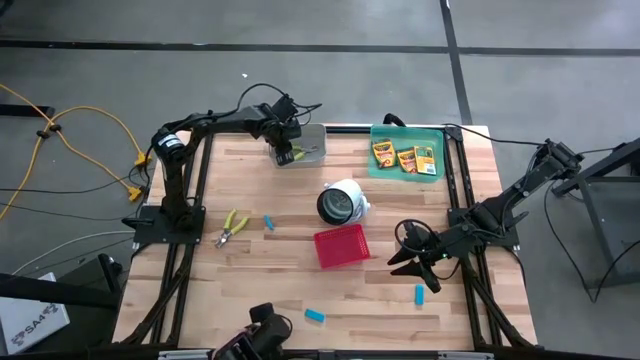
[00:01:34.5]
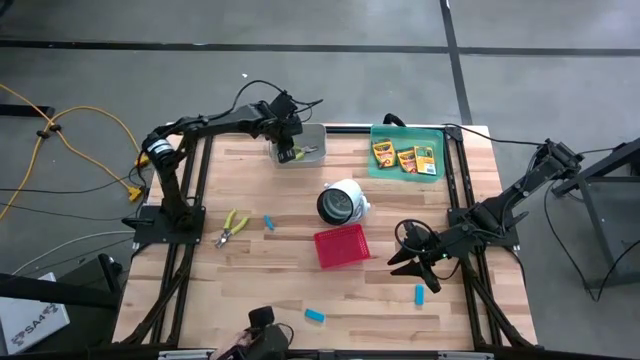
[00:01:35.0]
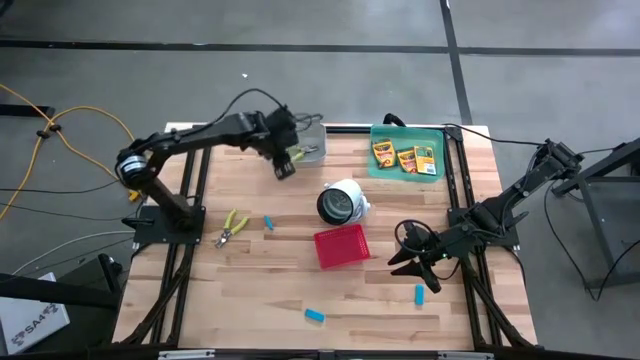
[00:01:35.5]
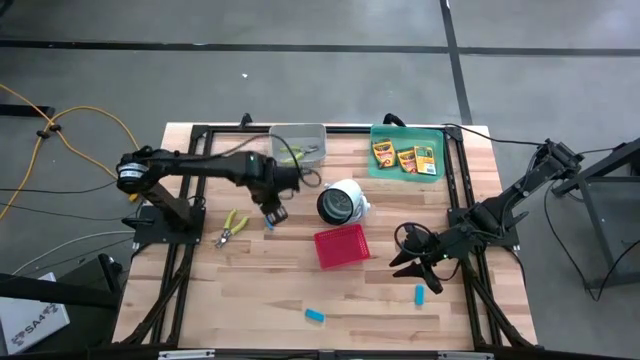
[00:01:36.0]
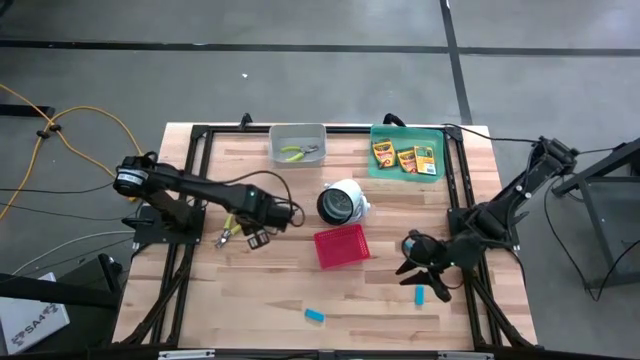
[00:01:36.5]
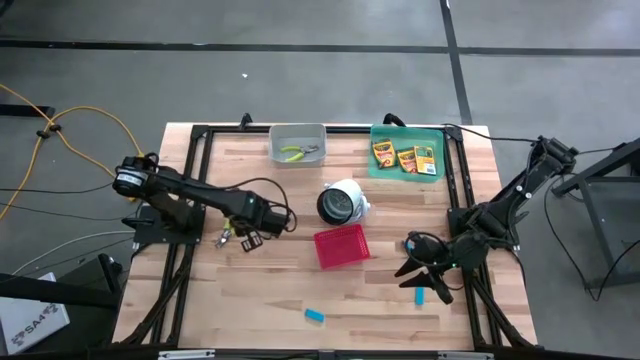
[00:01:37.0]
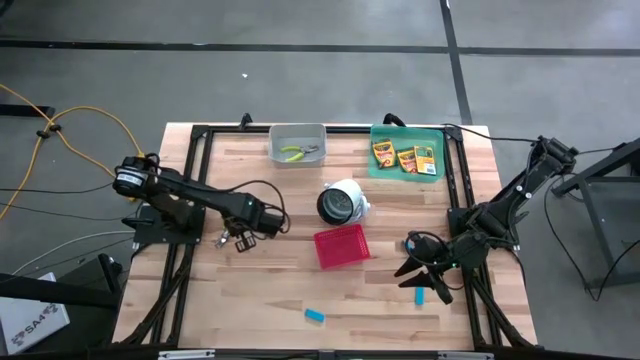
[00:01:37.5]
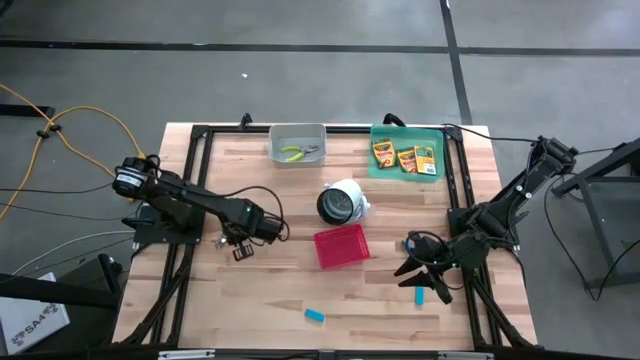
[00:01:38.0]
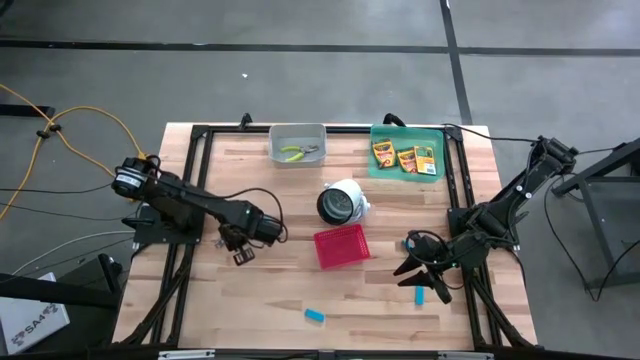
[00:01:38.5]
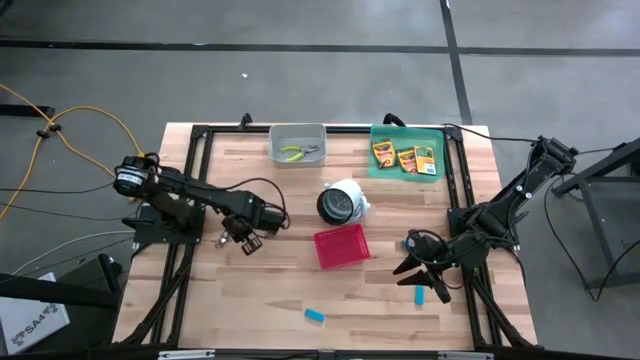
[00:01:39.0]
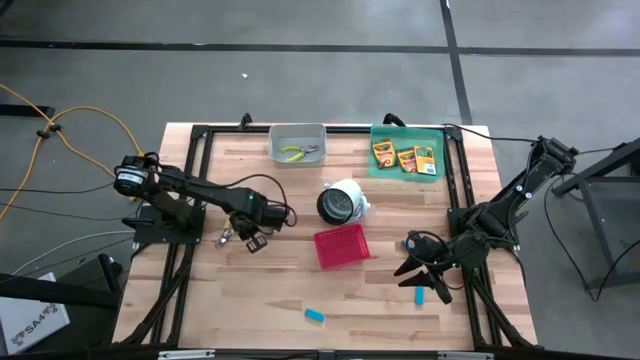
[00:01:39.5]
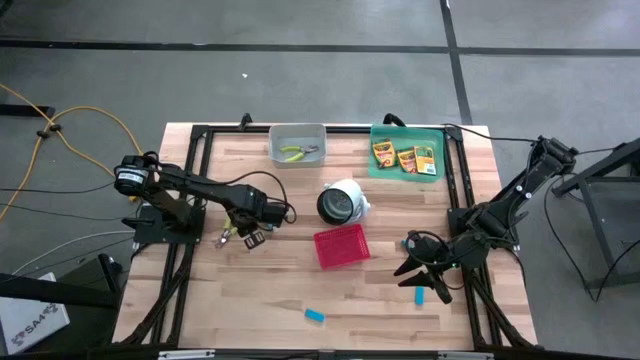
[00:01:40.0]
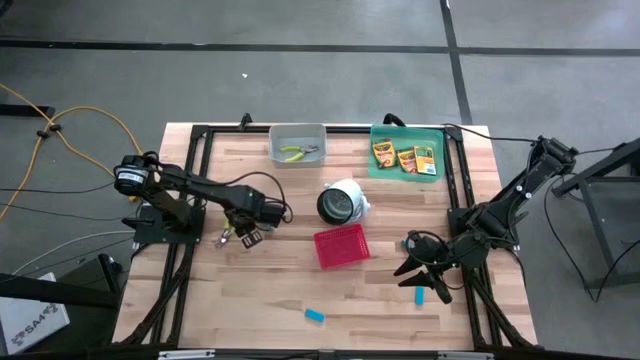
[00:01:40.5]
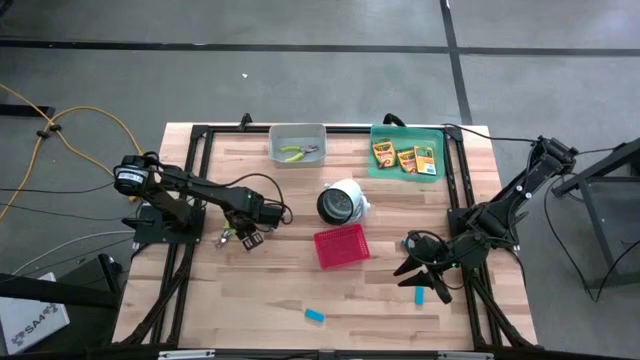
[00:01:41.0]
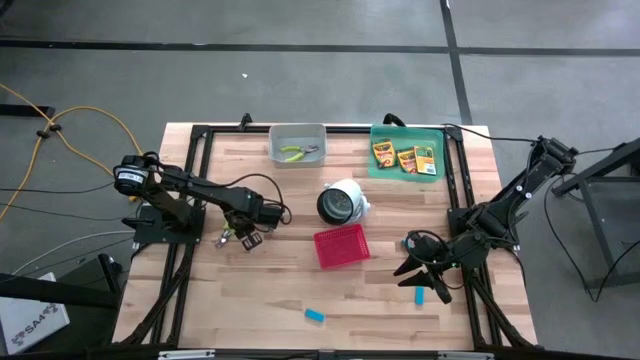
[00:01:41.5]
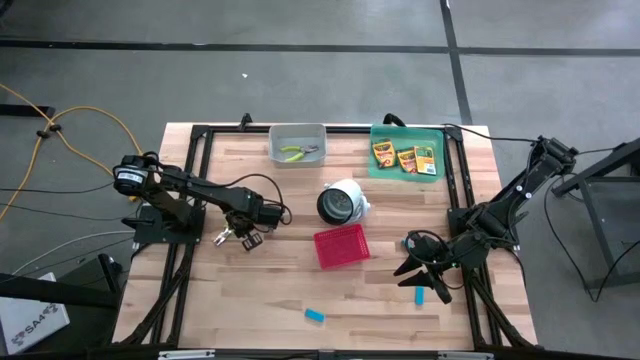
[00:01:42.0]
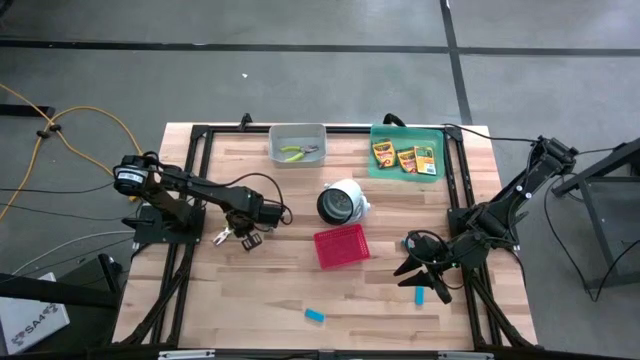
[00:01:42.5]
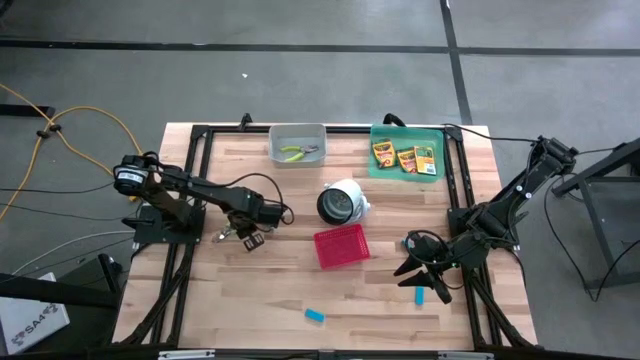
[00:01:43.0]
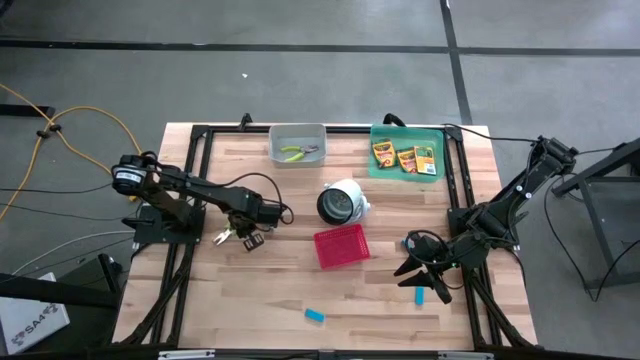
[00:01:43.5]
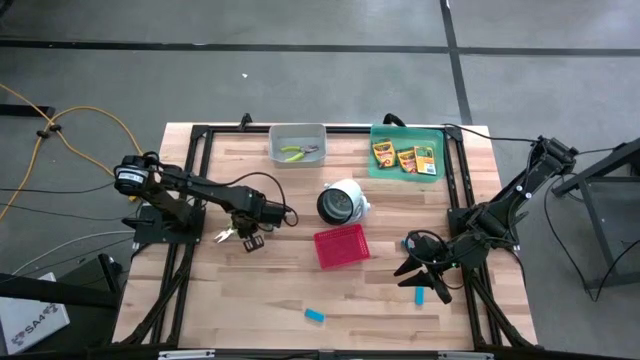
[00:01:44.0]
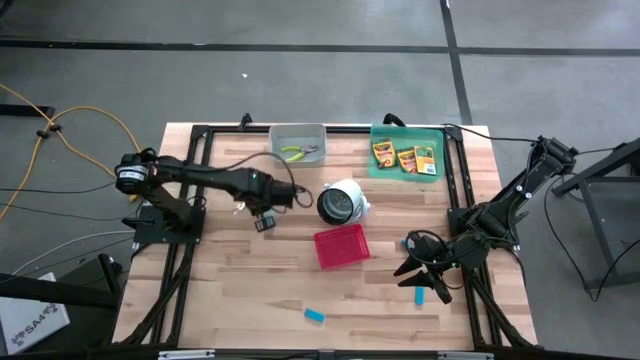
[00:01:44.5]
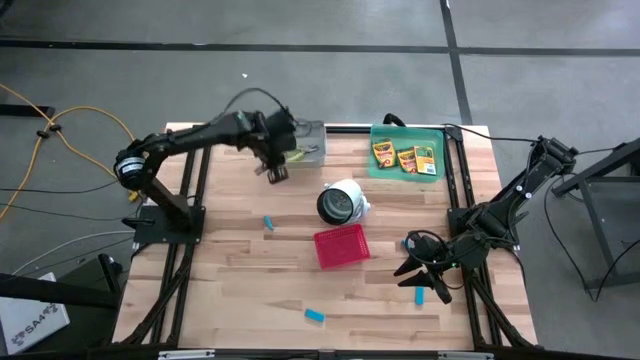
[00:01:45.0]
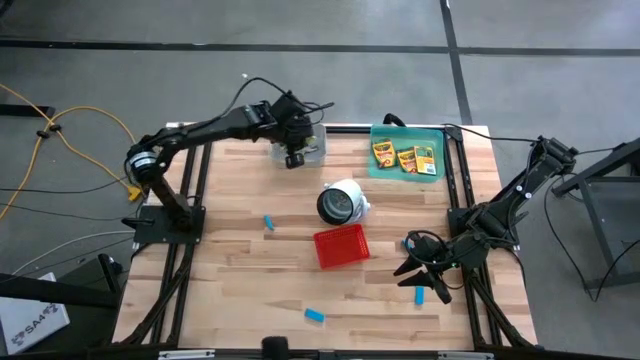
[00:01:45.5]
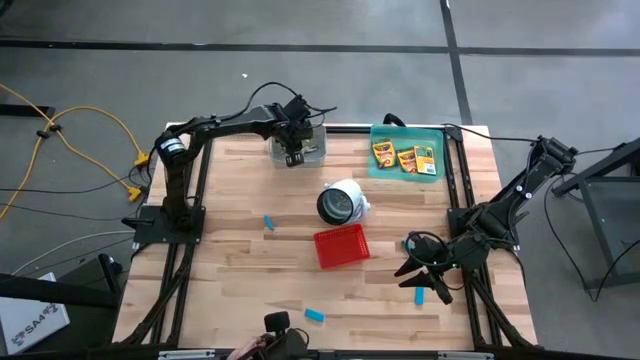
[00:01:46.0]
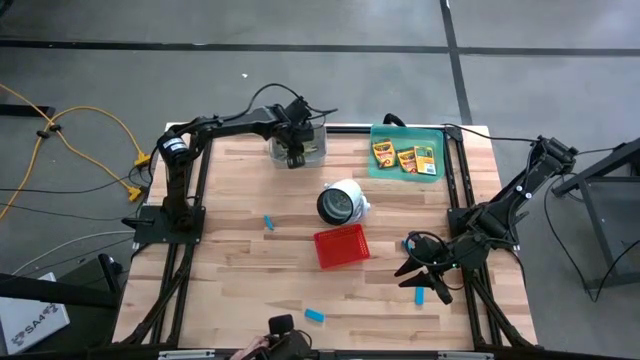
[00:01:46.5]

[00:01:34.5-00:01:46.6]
Task: Pick & Place School Supplies
Put the green hole puncher into the gray bin

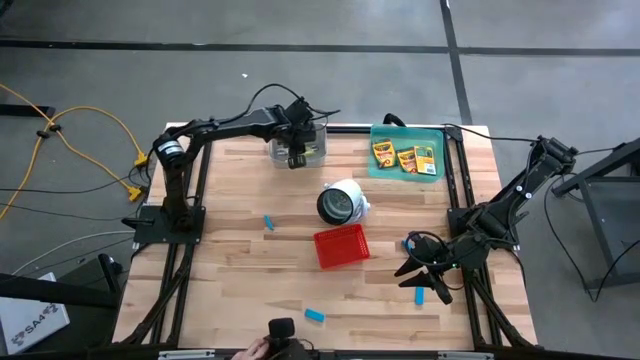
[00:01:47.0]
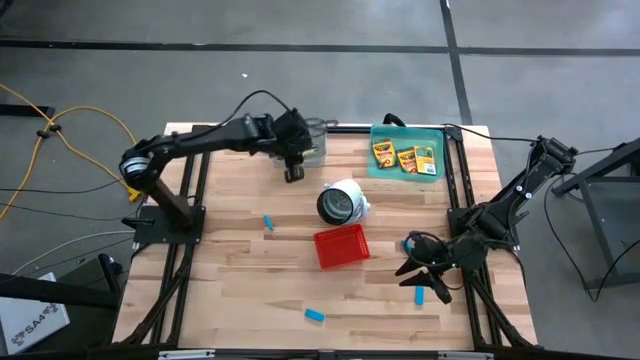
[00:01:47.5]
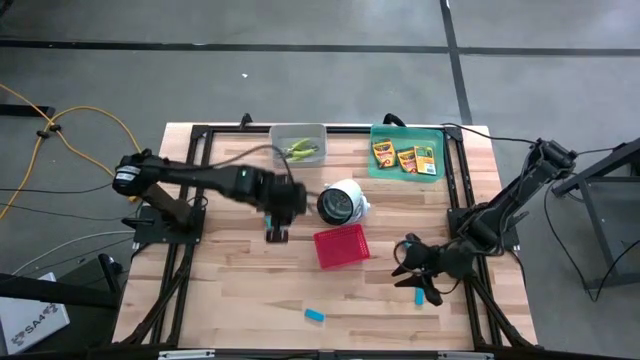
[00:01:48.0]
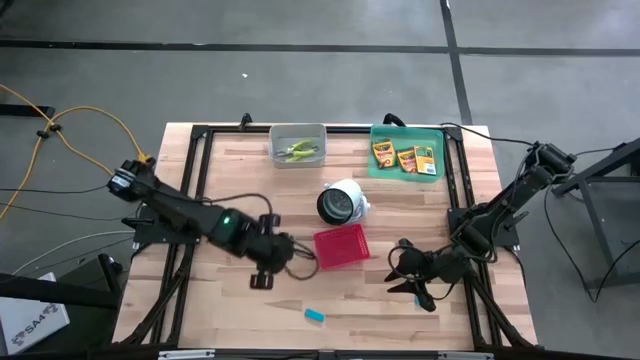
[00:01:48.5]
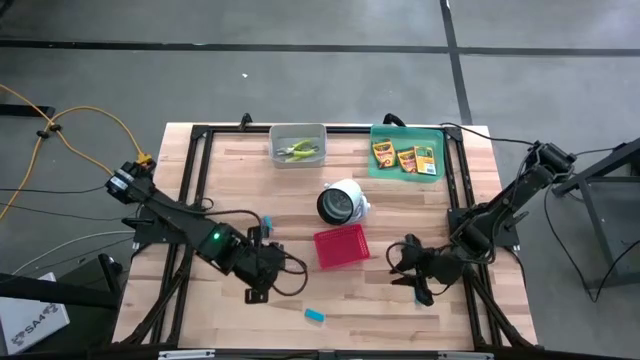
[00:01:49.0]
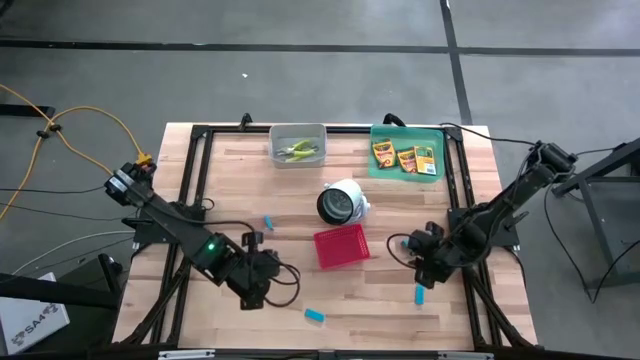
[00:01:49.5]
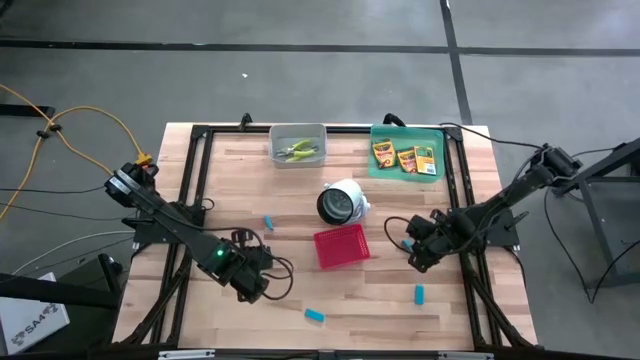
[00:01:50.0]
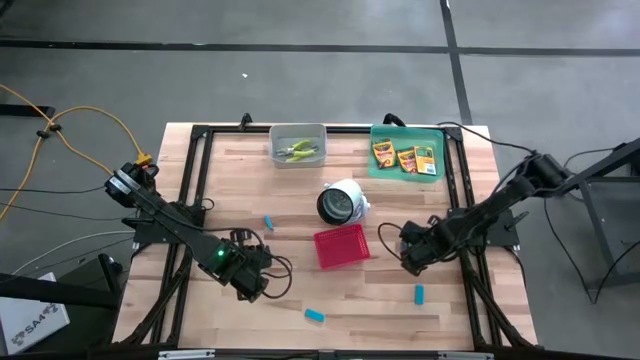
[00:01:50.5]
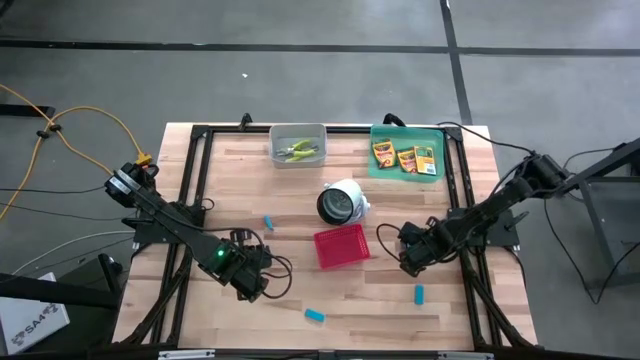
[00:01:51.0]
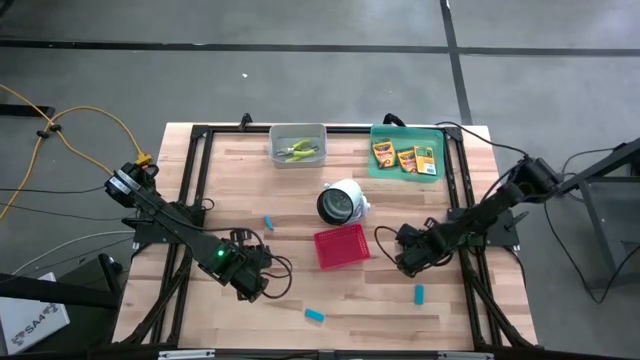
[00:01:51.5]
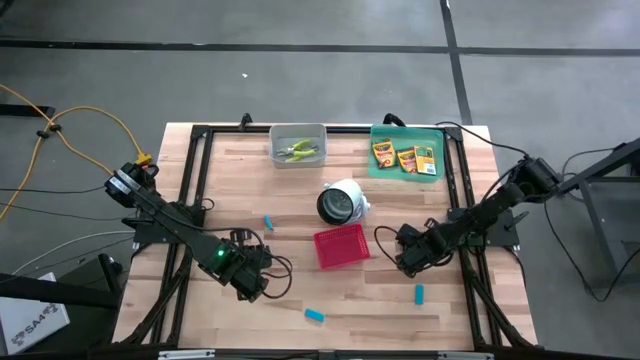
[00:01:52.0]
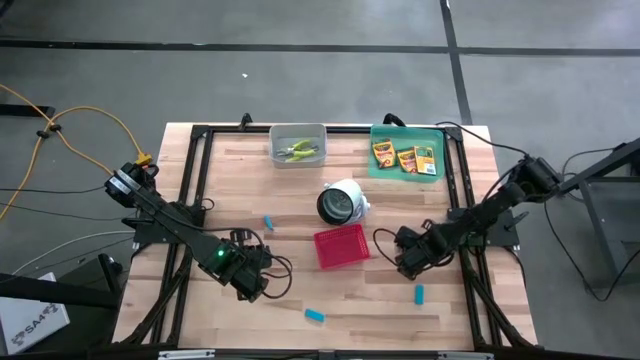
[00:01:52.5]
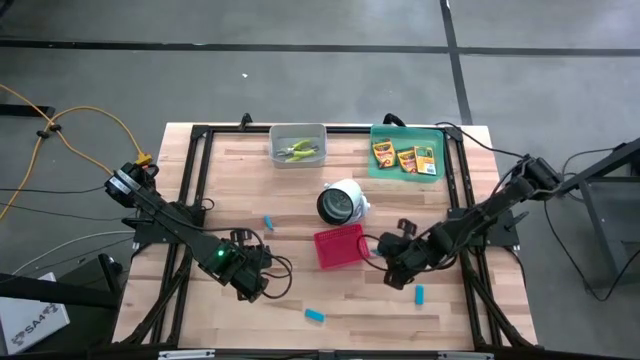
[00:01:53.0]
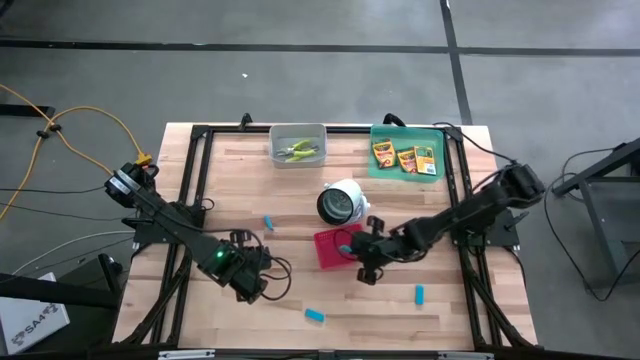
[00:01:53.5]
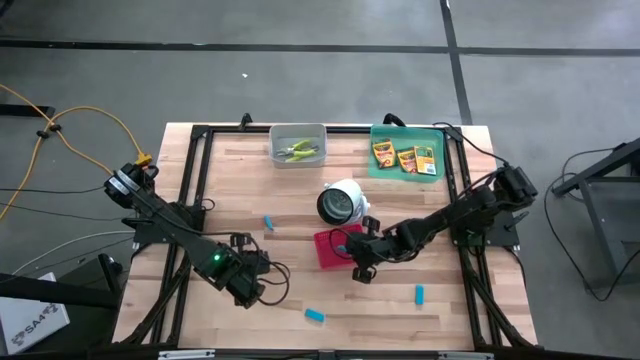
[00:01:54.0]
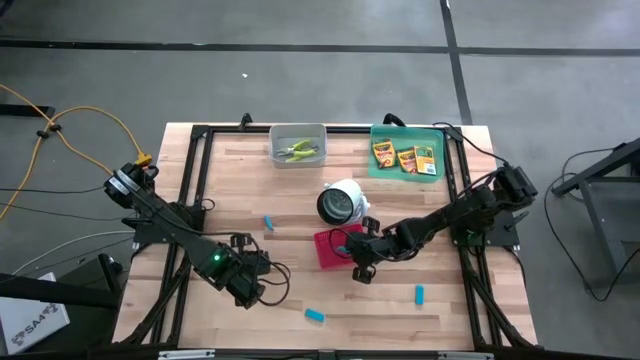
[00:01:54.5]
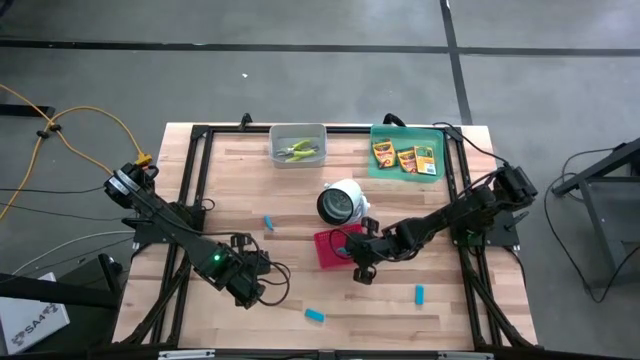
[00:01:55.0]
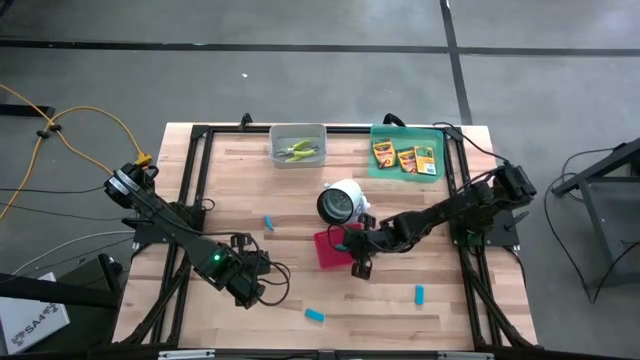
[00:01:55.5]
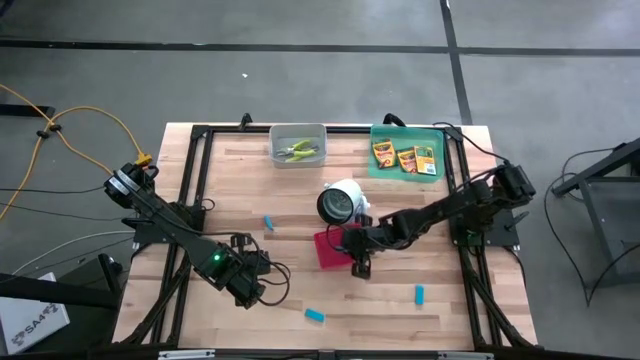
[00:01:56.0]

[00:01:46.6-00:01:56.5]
Put the blue eraser into the red bin
